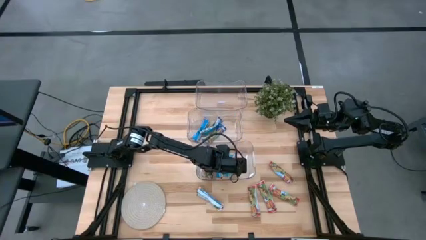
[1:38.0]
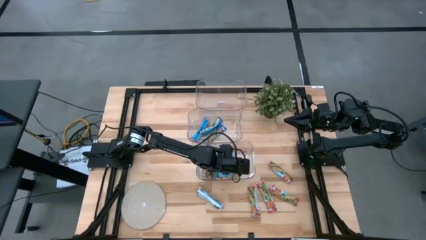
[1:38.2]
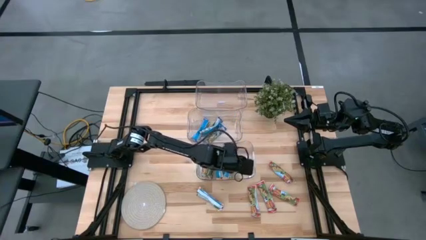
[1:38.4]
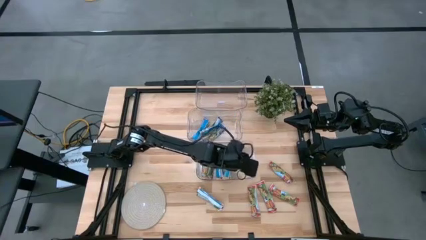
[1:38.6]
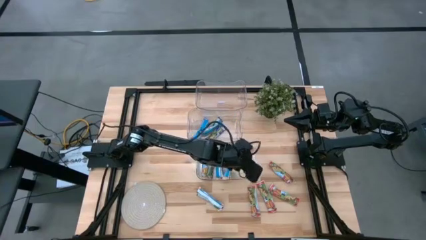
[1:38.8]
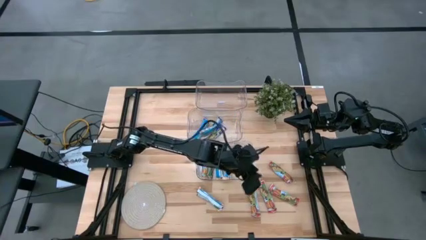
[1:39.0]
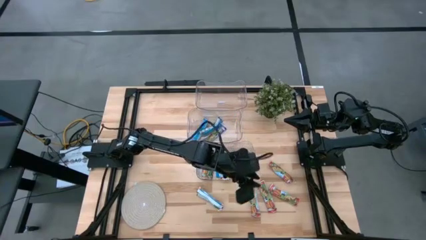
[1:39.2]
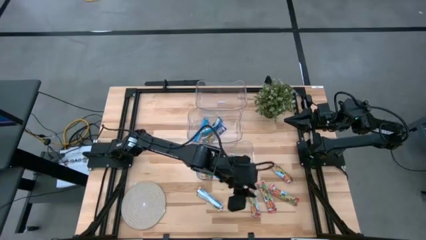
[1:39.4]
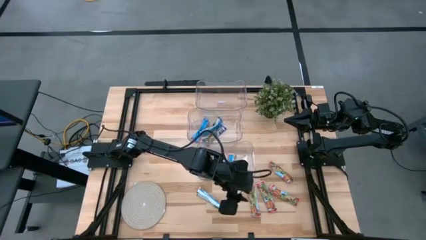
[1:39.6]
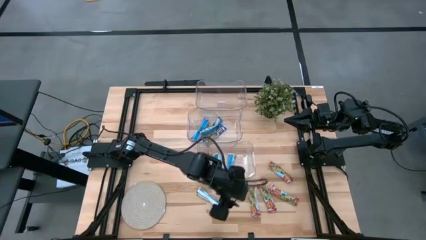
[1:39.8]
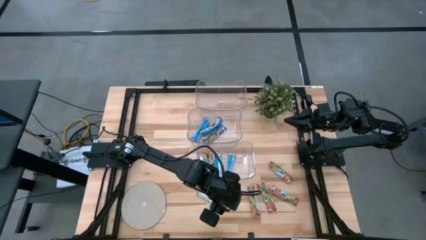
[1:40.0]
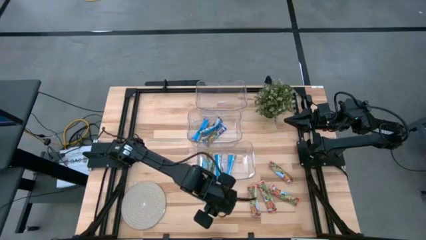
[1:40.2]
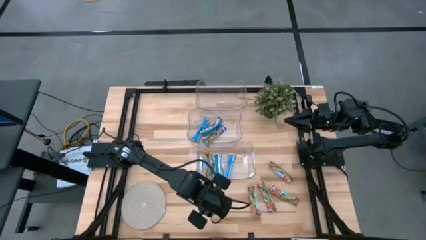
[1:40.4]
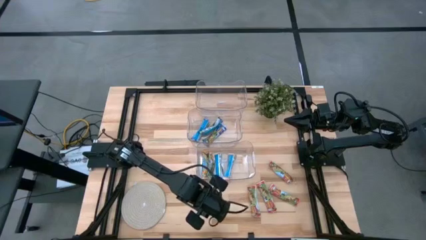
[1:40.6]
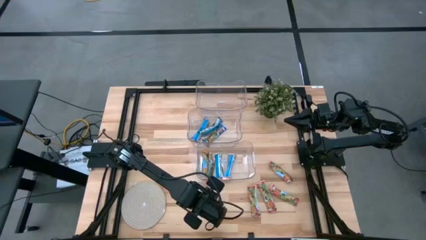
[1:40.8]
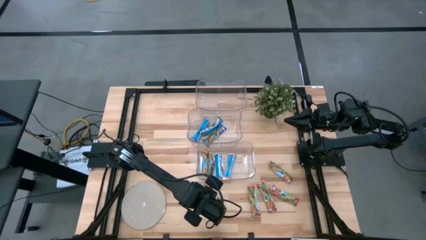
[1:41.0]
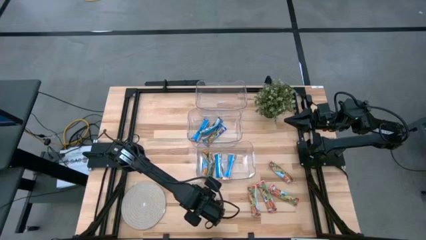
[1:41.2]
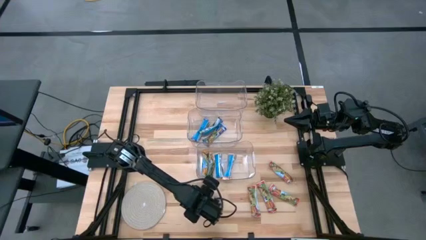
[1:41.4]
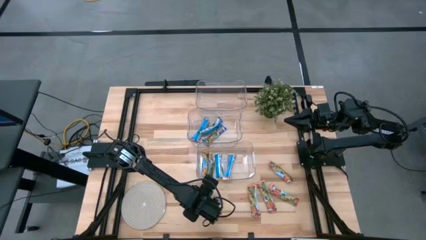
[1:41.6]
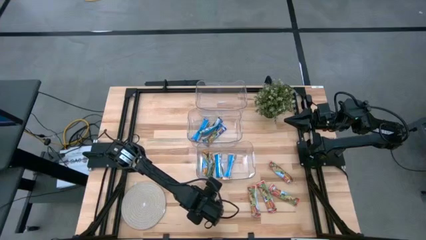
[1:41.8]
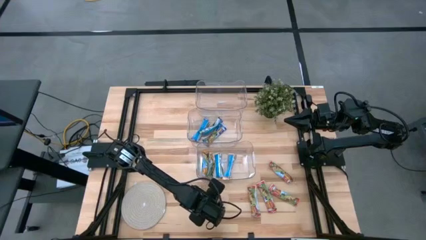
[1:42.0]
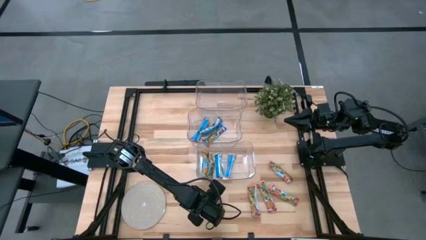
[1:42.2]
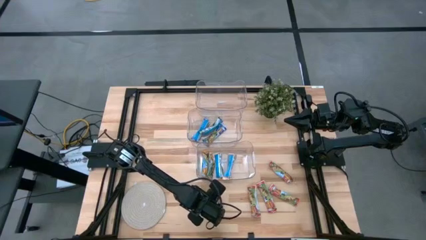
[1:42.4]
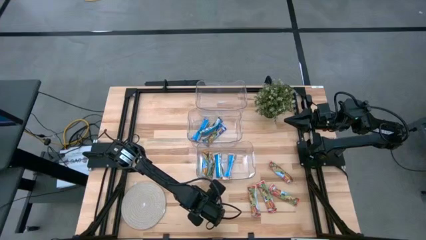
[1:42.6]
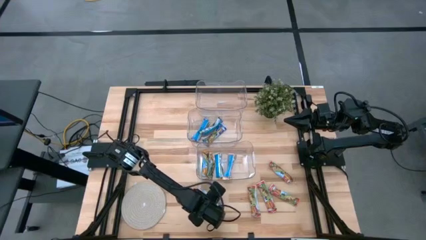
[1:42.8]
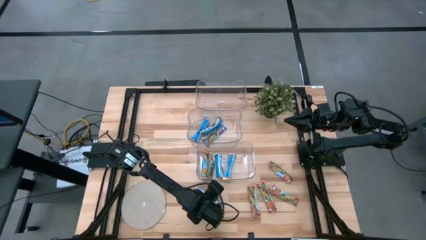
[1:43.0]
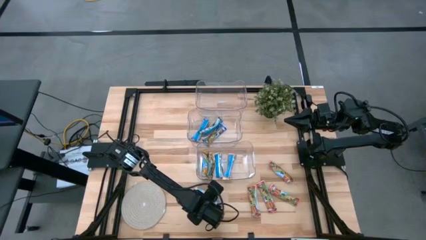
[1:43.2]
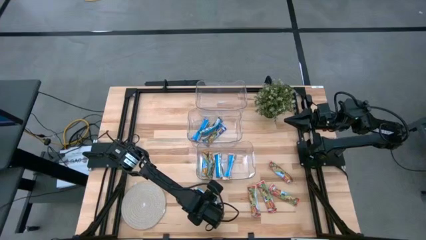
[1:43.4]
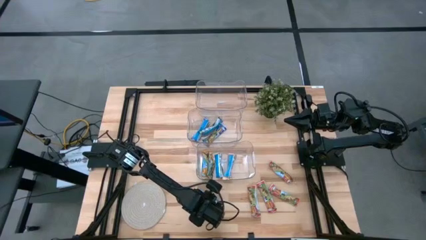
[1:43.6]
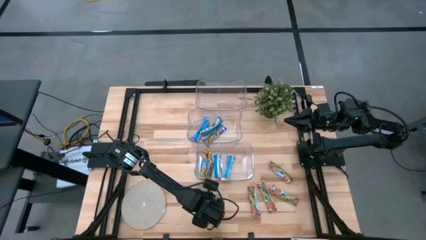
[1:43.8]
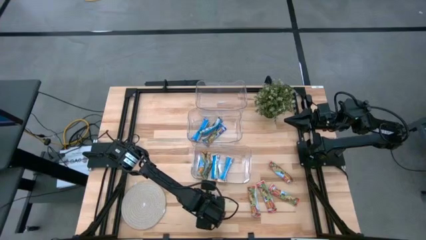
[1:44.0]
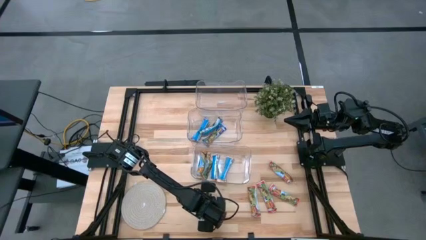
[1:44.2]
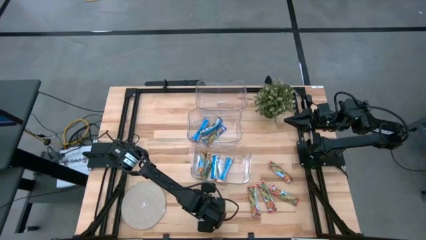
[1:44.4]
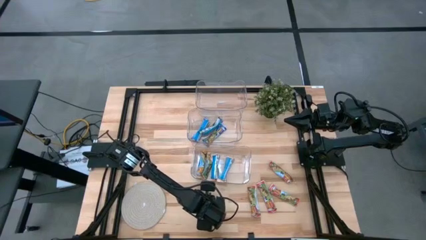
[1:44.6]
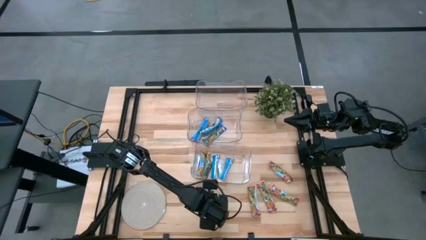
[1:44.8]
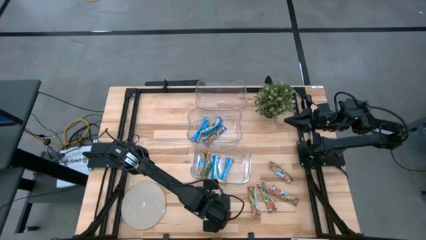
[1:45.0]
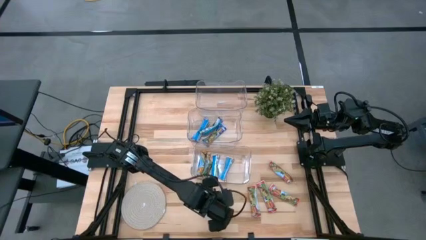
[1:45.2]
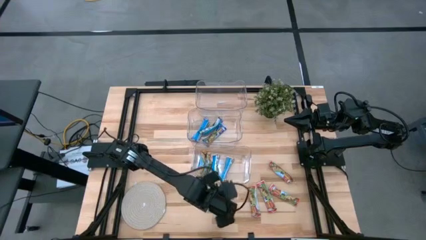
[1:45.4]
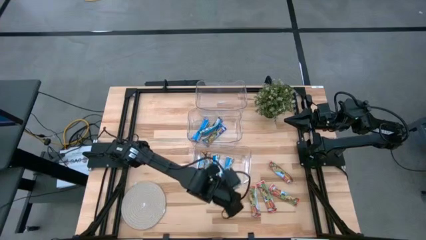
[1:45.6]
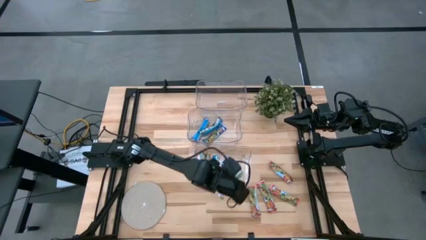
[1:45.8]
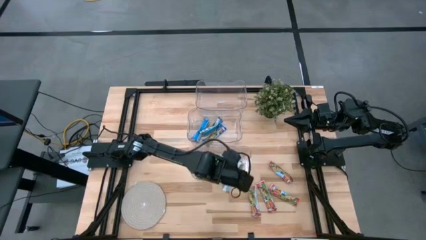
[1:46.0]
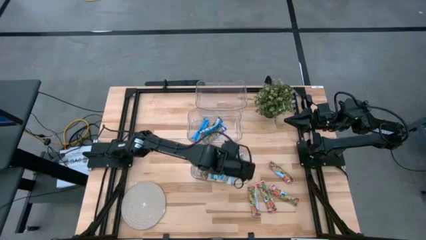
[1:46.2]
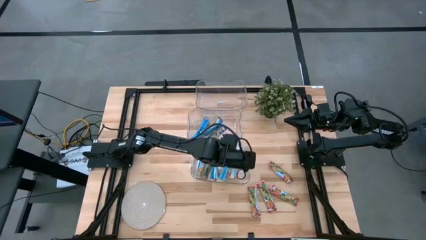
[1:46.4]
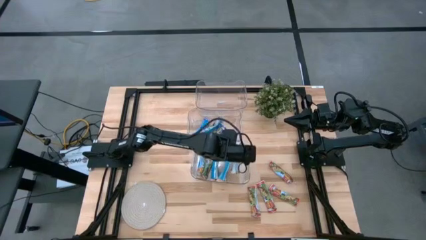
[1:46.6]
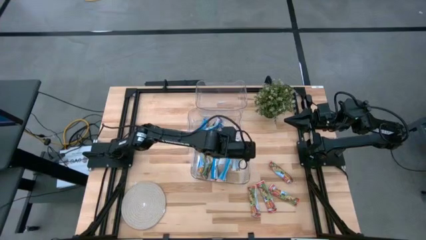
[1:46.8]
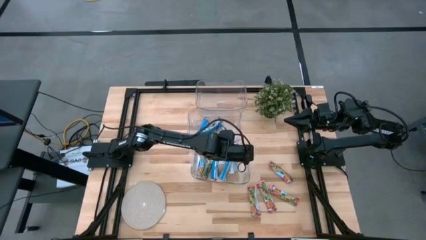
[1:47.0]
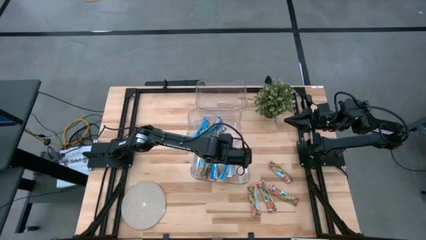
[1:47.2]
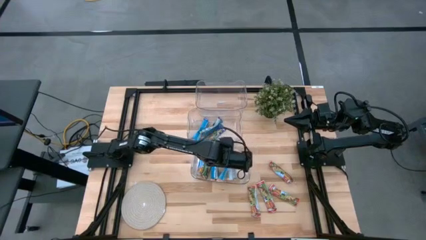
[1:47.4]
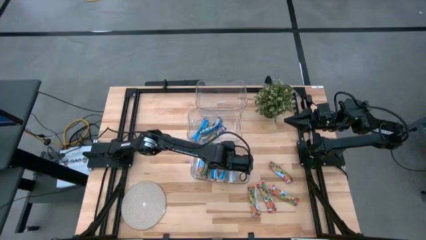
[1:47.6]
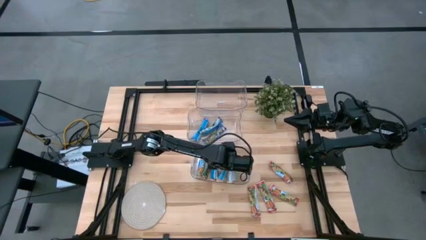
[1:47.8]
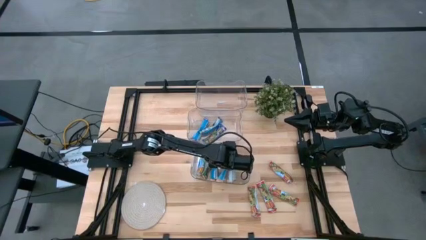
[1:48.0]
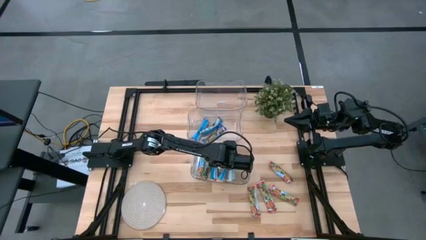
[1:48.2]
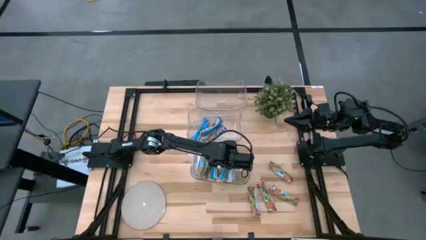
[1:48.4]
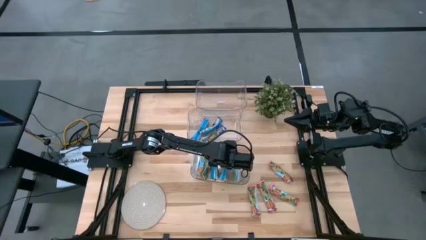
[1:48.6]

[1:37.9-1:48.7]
Task: Pick and place Granola Bars by type
Put the yellow granola bar into the bottom transparent bin

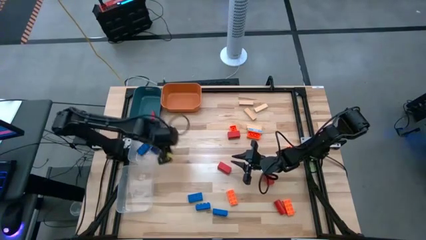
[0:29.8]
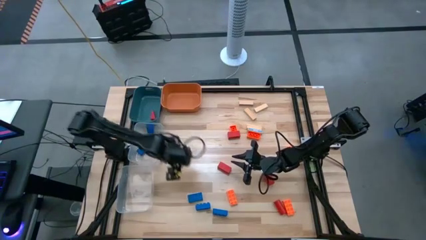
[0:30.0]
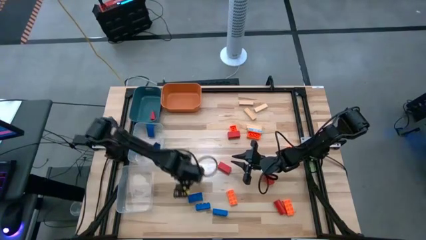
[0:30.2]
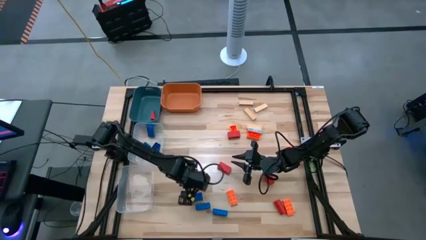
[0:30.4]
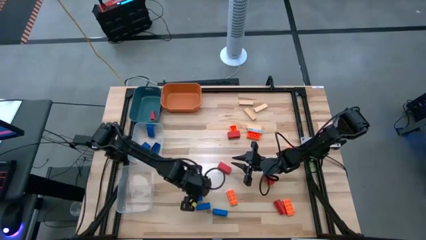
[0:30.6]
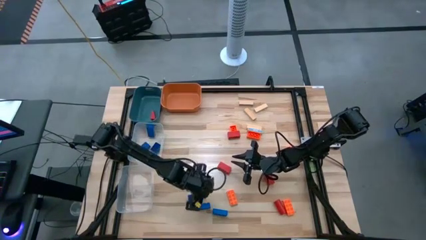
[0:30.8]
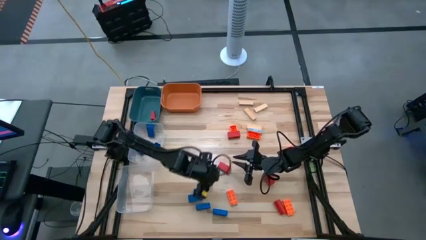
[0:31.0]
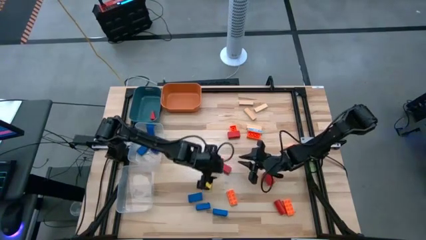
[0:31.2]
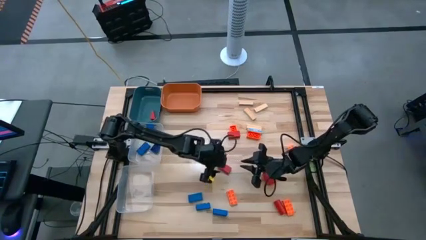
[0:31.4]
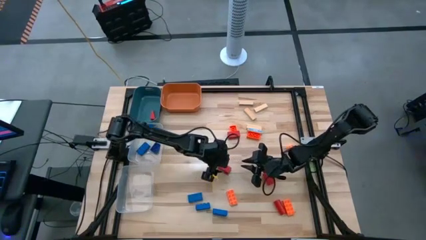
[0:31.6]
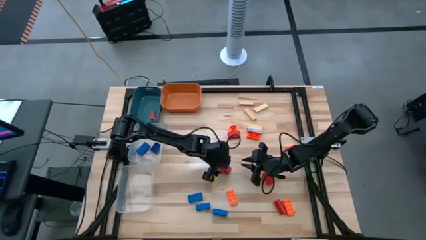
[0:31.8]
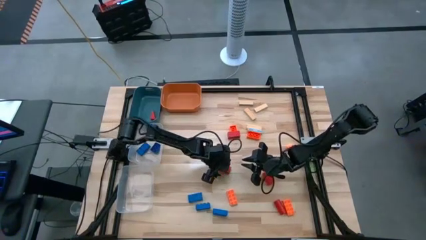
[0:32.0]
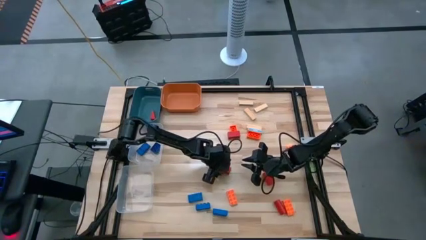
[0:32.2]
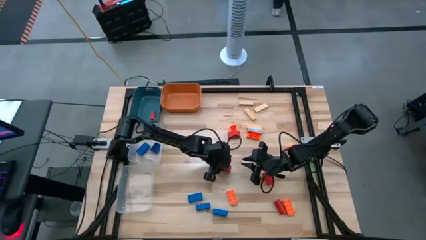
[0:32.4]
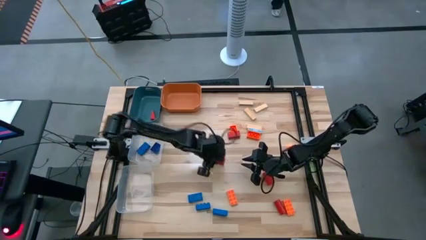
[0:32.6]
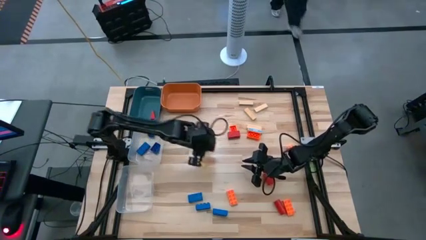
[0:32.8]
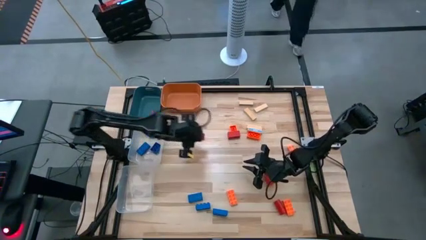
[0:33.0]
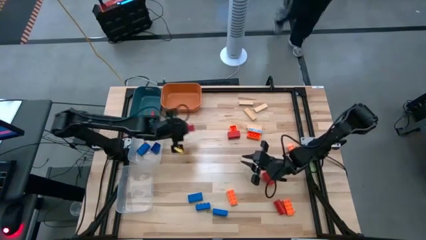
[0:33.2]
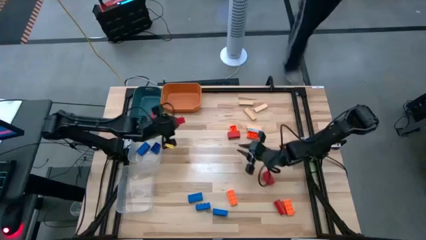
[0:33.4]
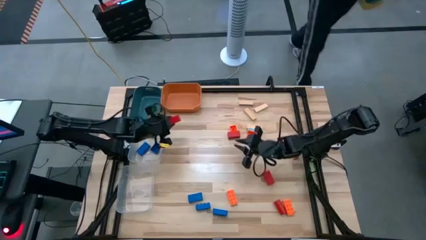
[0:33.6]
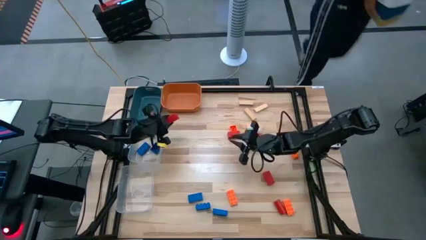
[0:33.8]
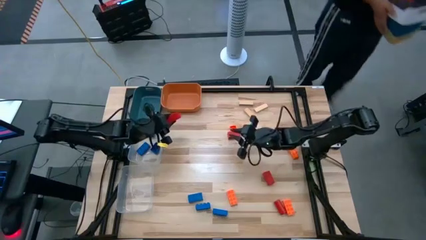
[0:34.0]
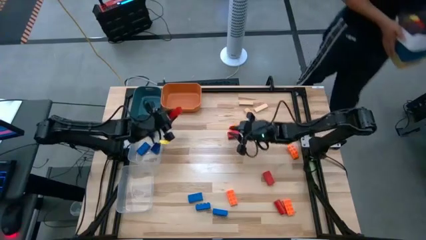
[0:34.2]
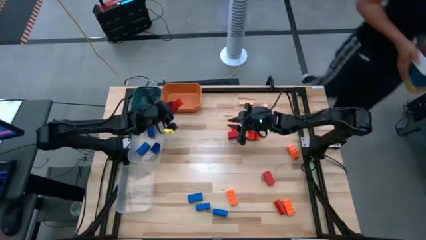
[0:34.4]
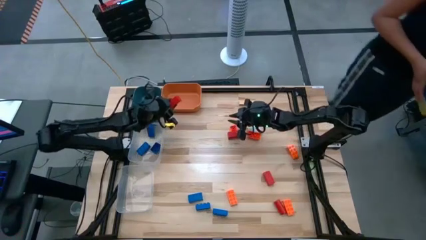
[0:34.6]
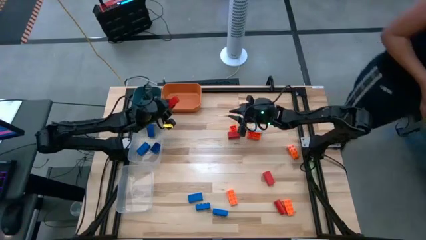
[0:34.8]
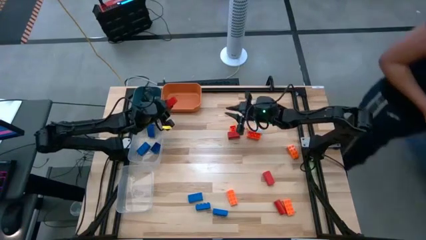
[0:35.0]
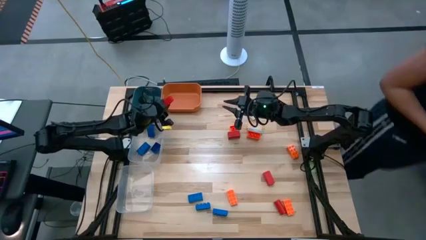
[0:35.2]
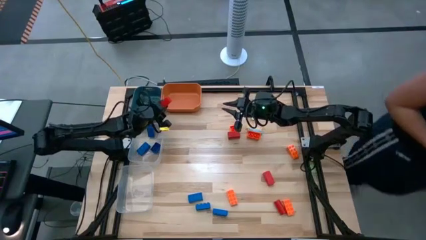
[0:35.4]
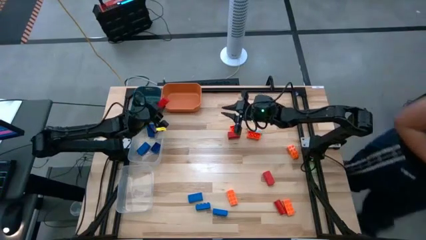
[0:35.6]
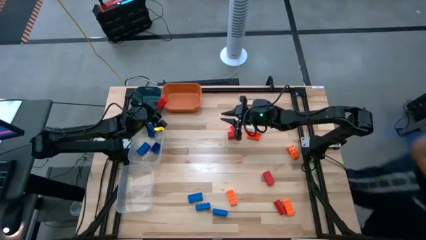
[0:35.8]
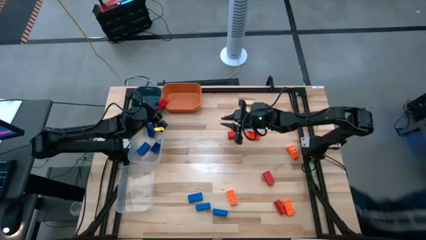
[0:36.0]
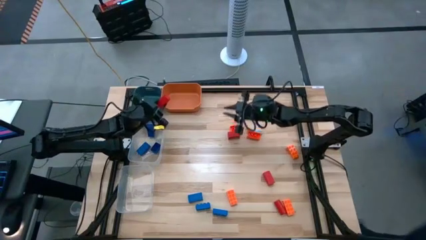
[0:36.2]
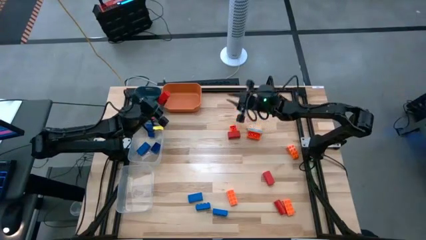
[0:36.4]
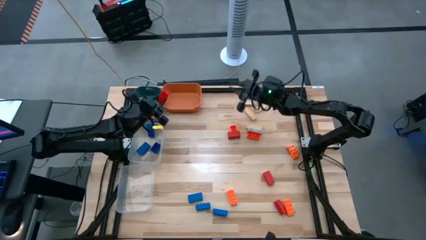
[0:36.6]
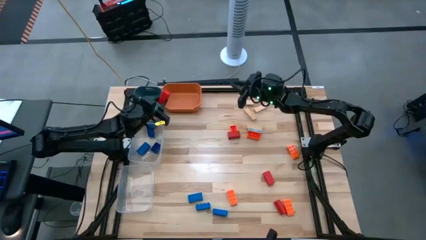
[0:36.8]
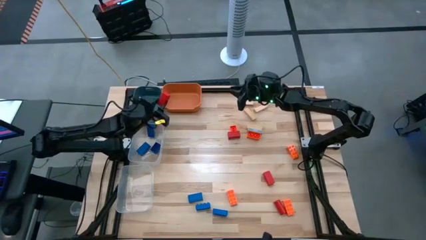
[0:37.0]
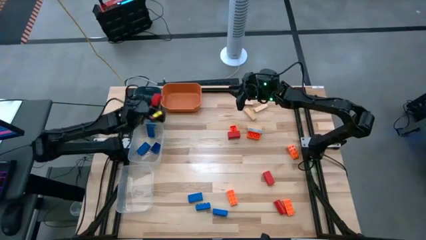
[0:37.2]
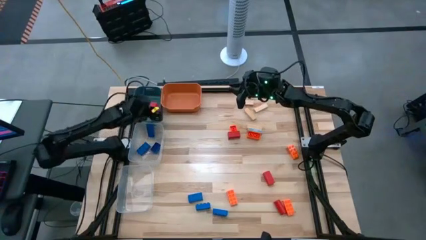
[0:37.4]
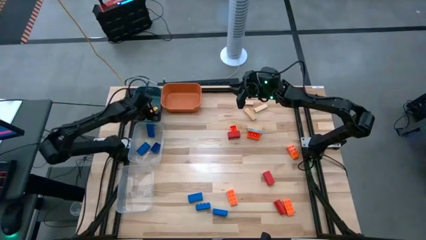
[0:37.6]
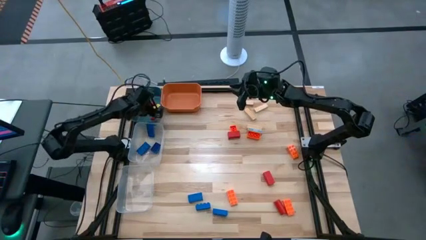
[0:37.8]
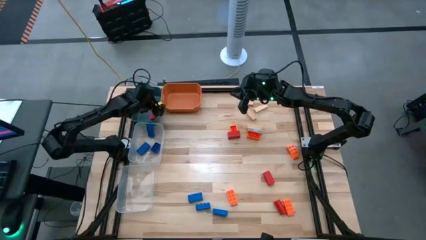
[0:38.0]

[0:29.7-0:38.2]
Task: Sort blocks
Put the wooden red block into the blue bin
